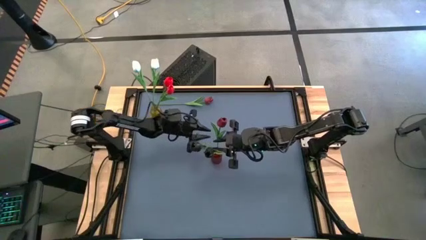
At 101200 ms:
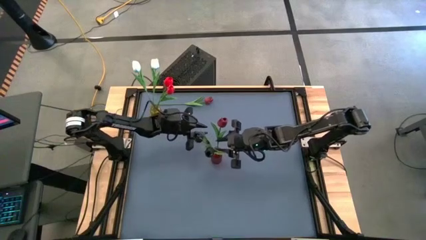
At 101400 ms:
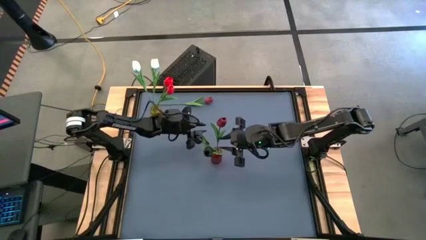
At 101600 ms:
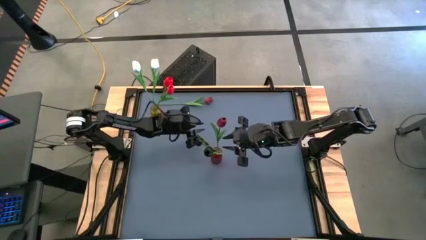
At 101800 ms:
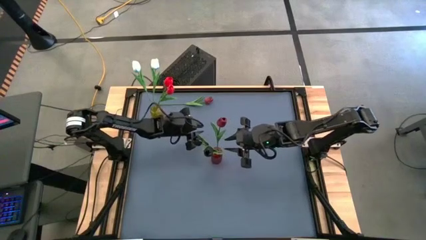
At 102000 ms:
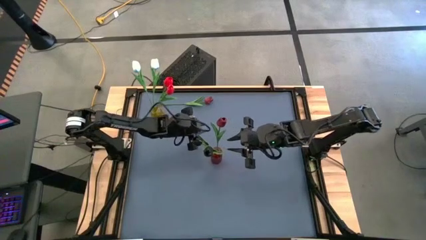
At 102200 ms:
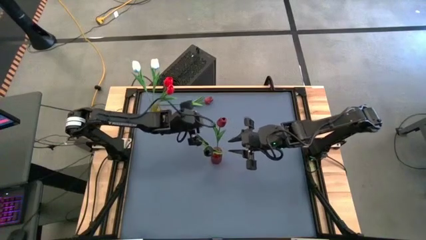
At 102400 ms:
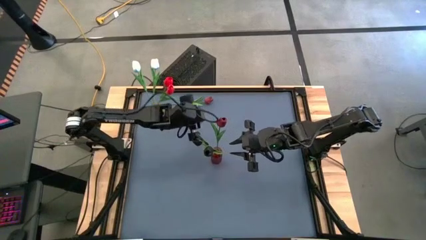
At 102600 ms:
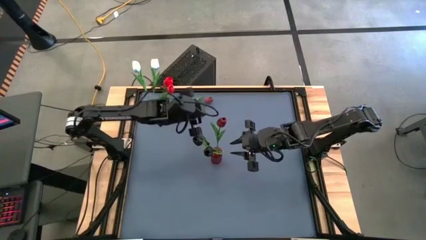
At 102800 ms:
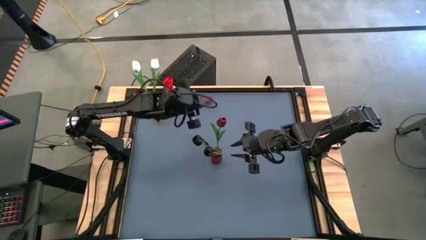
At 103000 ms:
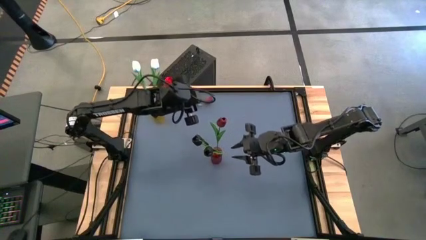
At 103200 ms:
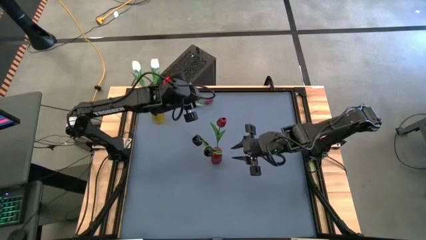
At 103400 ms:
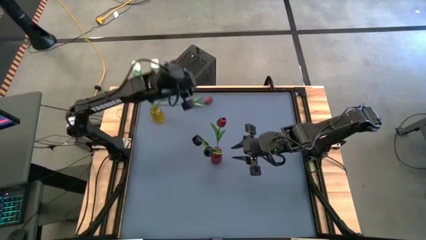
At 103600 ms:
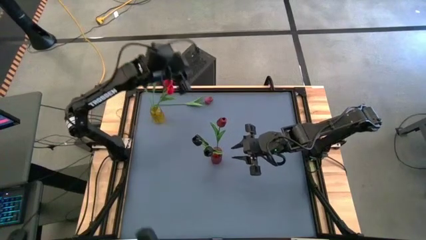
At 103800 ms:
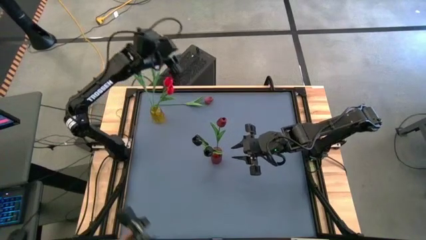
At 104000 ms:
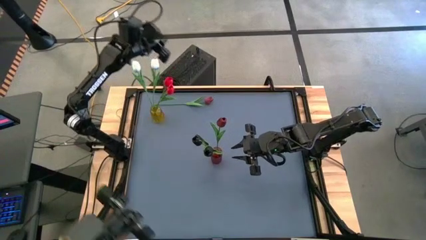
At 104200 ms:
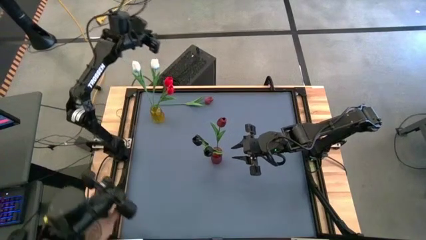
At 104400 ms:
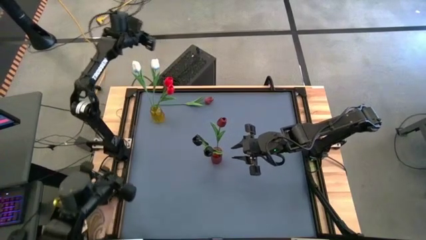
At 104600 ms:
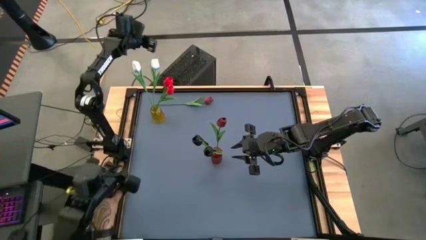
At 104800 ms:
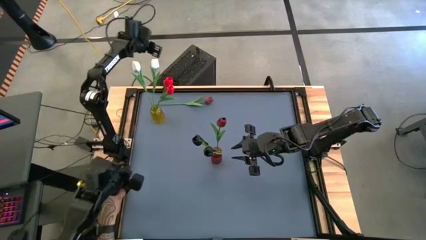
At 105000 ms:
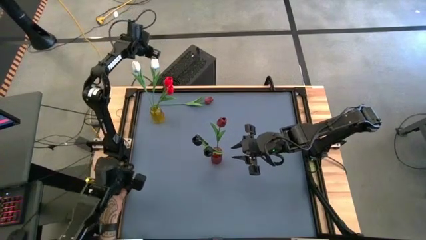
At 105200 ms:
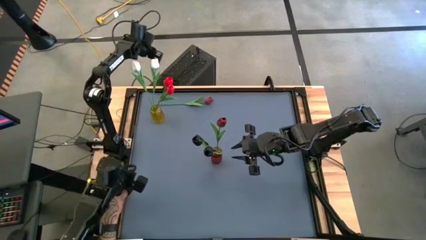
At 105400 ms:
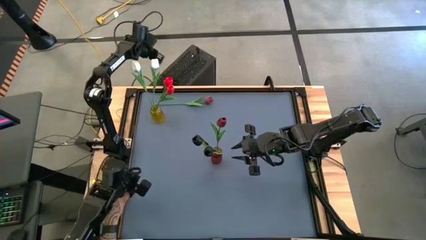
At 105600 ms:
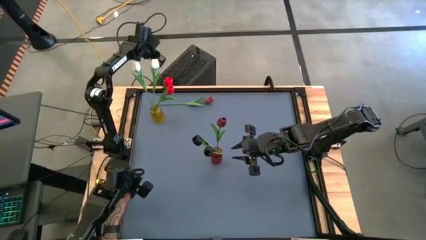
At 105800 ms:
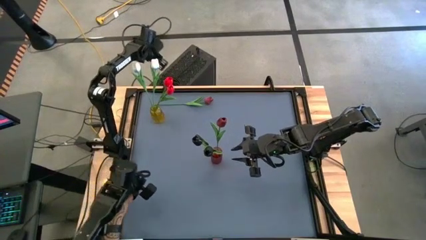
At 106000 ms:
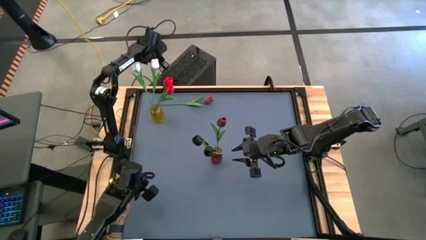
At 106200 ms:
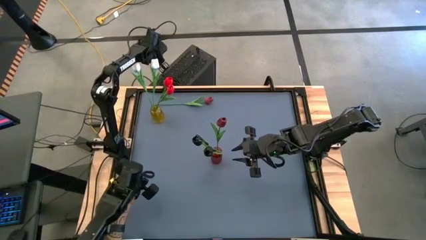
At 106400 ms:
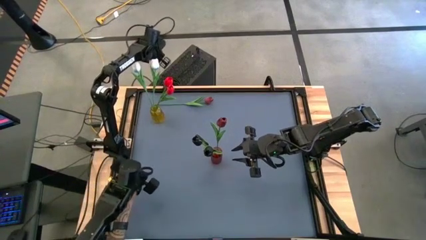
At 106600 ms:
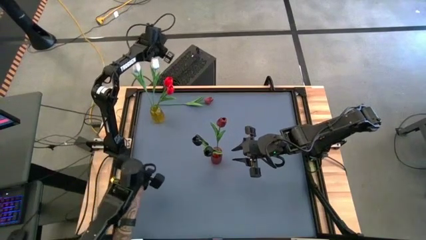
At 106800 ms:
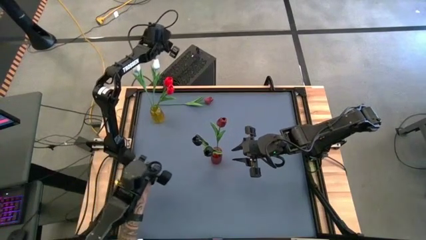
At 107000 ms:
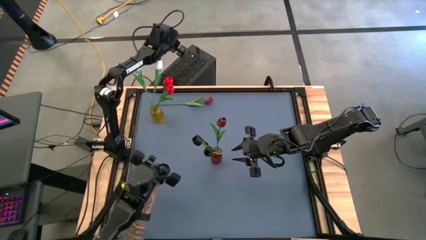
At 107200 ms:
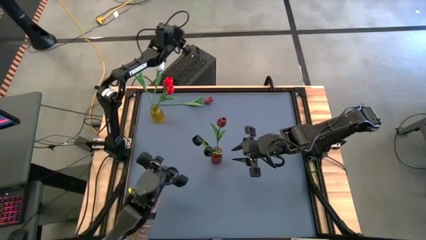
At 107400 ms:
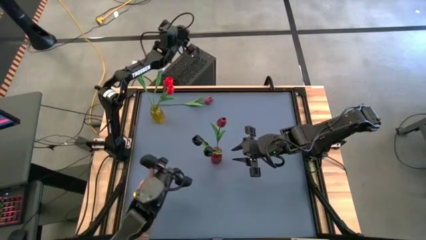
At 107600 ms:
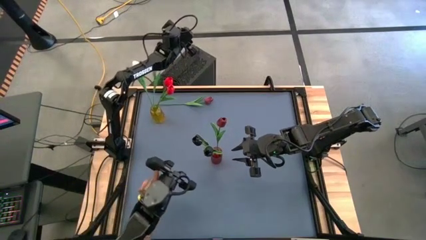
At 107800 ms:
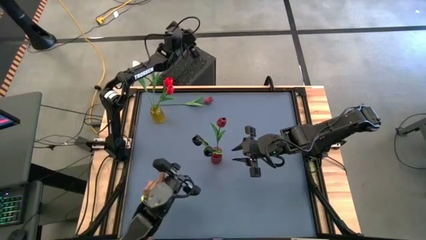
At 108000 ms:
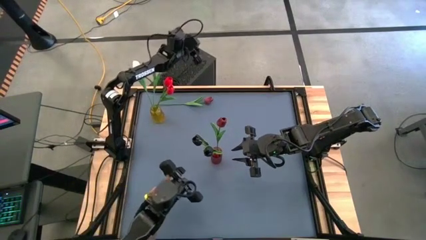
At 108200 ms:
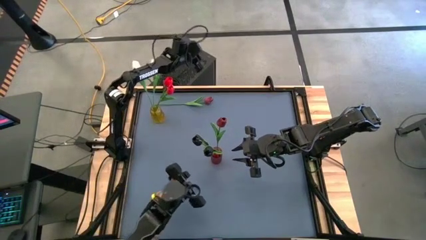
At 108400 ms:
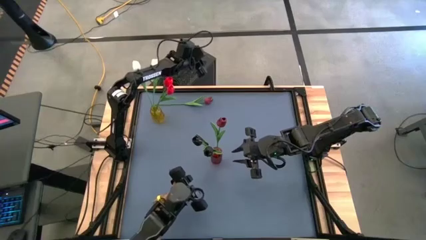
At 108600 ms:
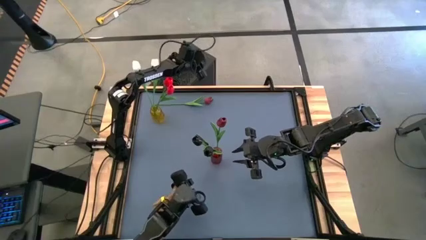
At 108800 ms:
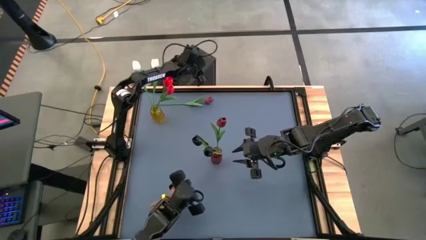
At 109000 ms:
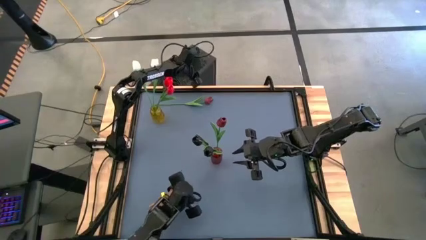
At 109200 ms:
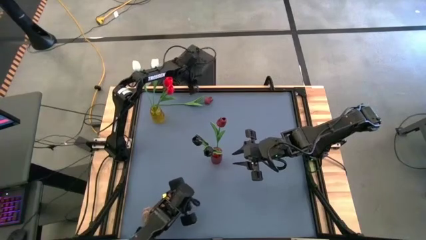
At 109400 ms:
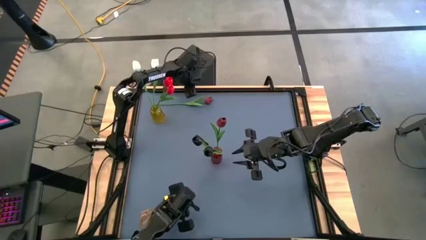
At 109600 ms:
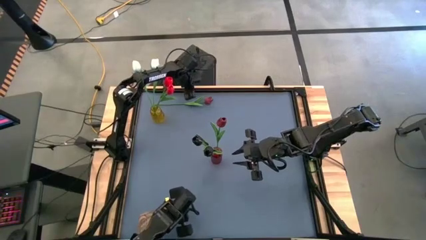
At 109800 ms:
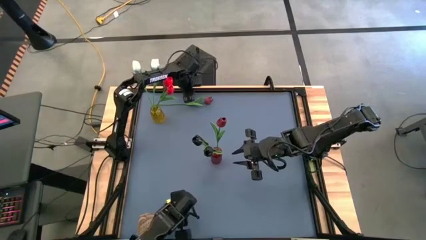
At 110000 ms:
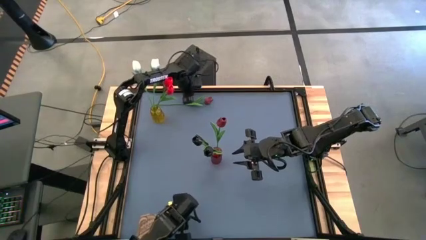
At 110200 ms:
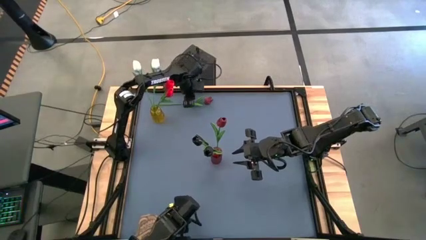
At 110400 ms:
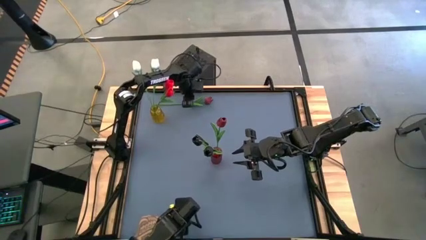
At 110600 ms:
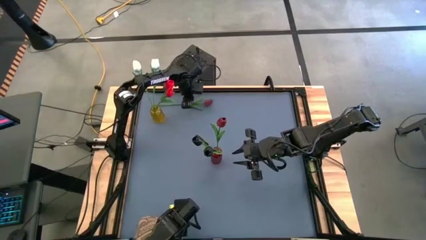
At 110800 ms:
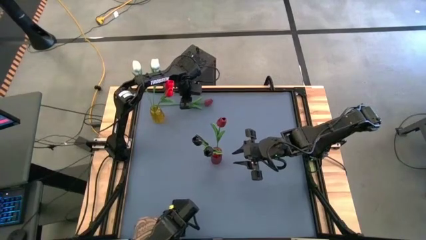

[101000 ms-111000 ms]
Task: Sort flowers into vase by color
Put the dark red tulip into the red vase
